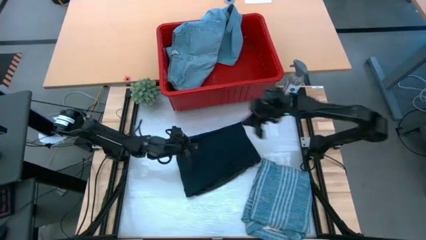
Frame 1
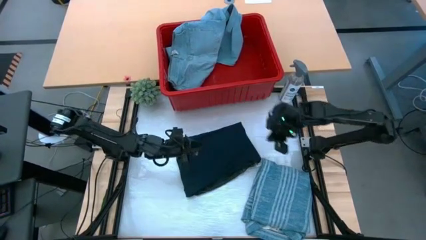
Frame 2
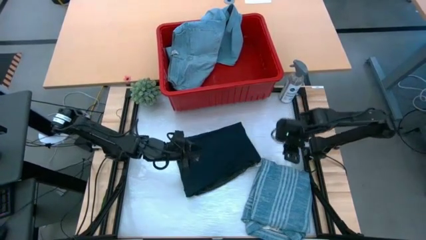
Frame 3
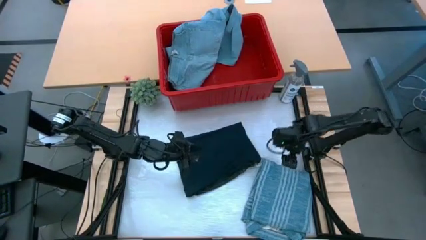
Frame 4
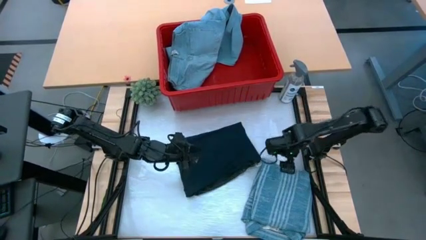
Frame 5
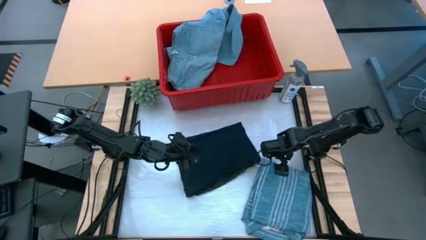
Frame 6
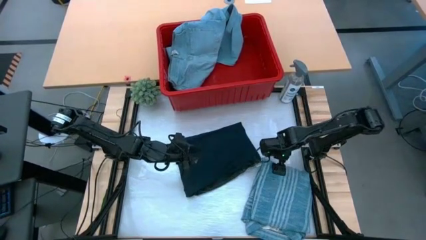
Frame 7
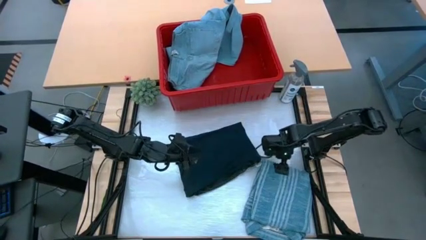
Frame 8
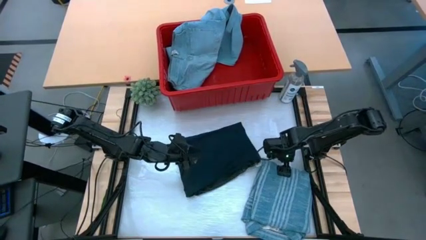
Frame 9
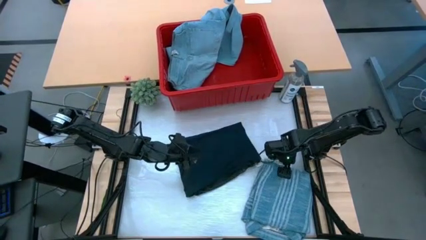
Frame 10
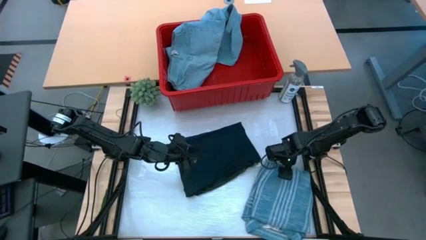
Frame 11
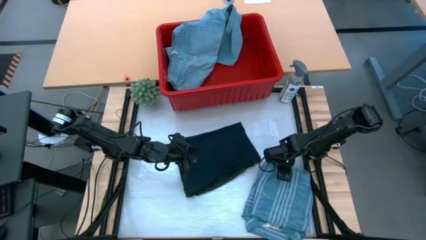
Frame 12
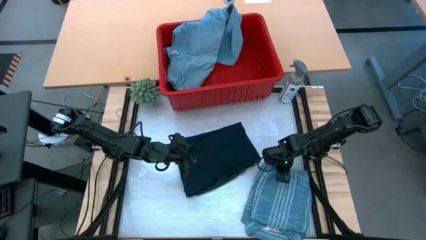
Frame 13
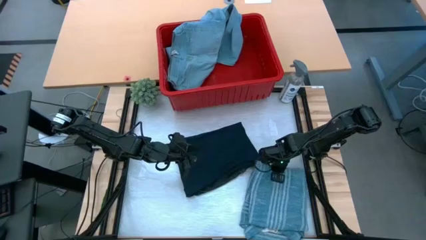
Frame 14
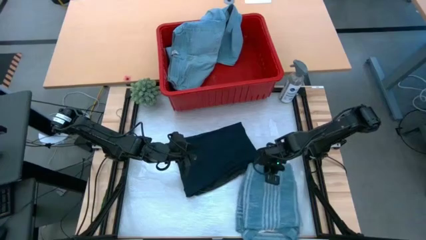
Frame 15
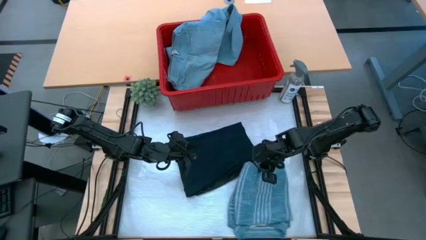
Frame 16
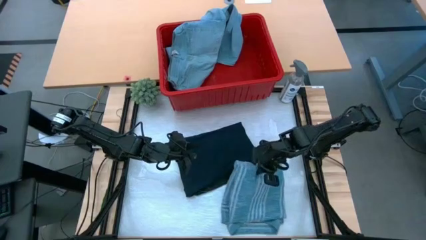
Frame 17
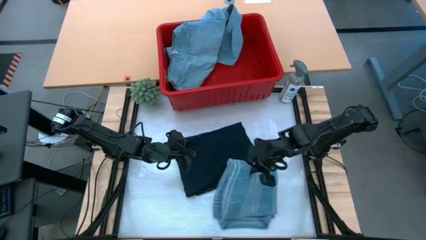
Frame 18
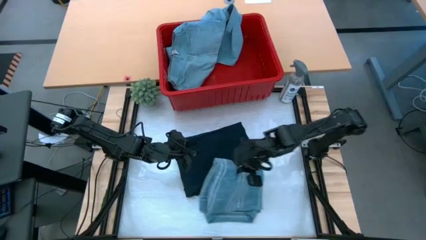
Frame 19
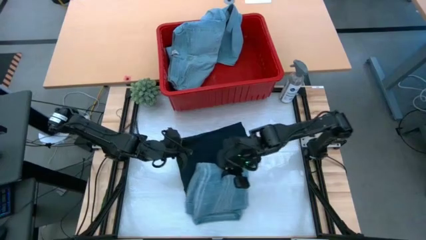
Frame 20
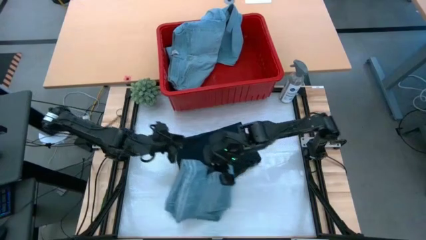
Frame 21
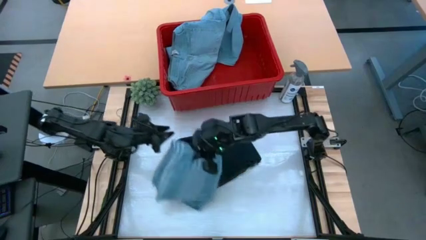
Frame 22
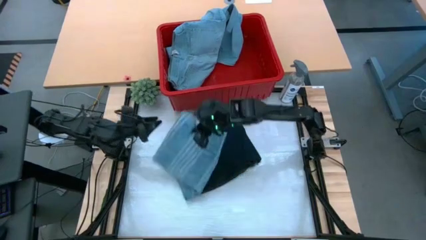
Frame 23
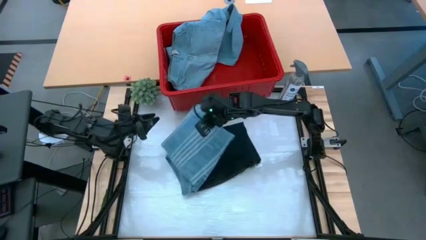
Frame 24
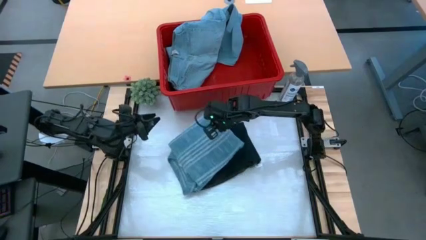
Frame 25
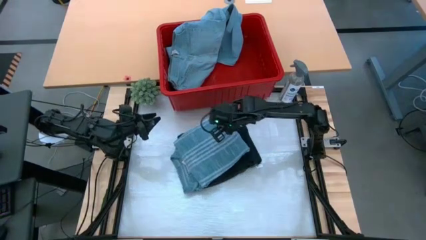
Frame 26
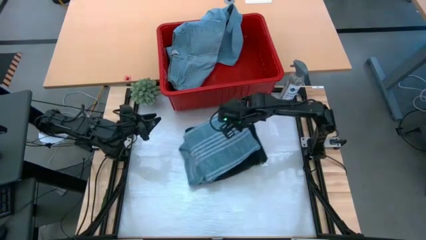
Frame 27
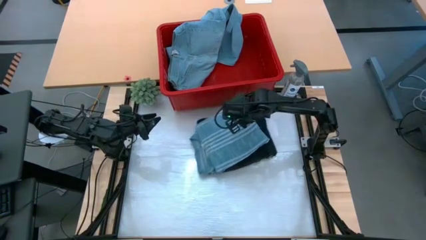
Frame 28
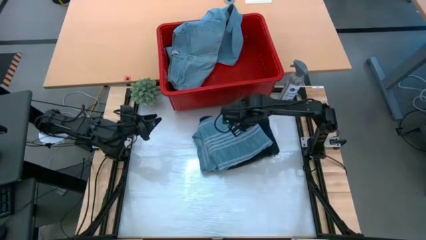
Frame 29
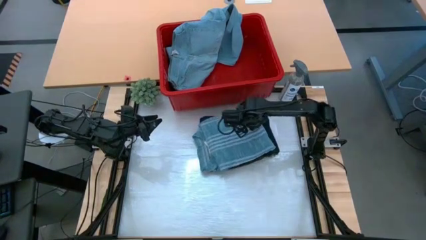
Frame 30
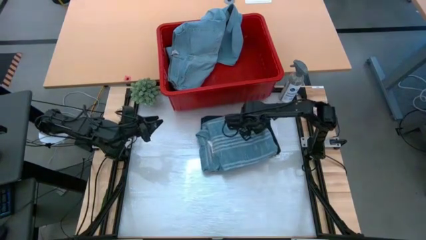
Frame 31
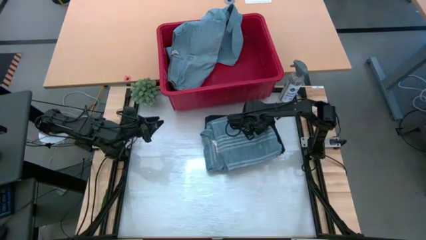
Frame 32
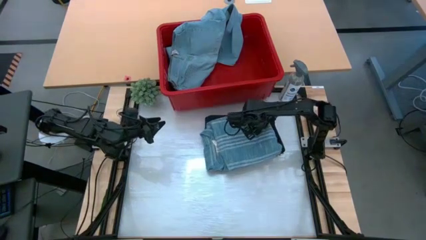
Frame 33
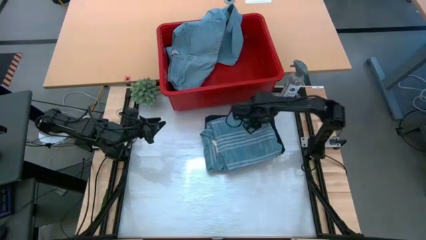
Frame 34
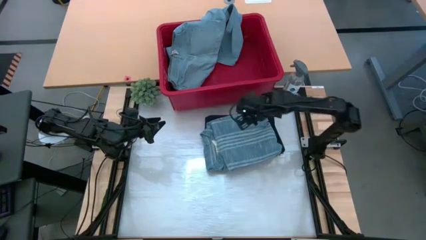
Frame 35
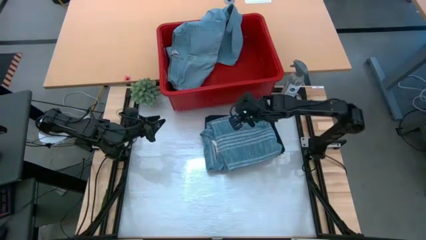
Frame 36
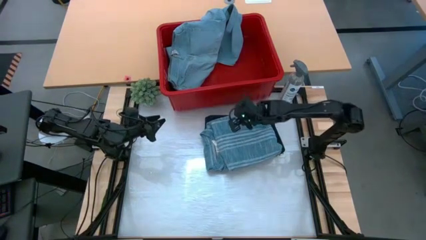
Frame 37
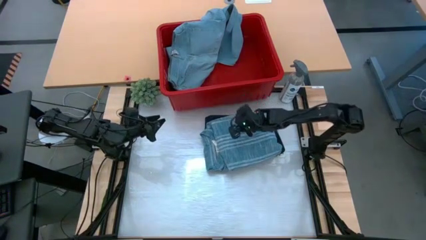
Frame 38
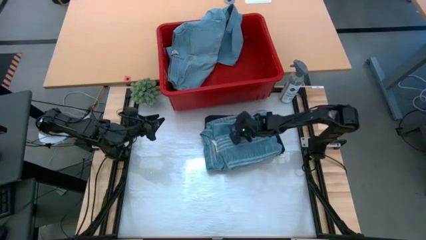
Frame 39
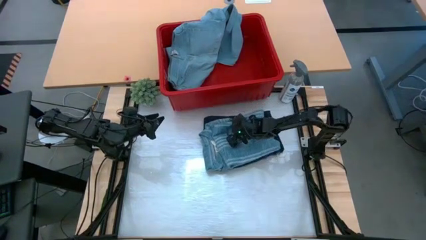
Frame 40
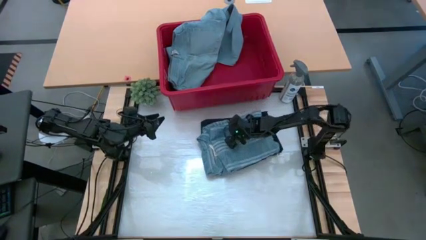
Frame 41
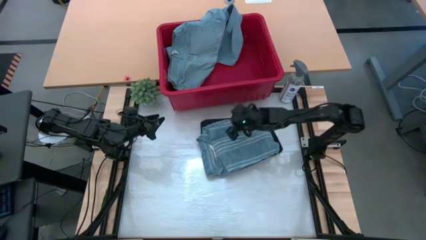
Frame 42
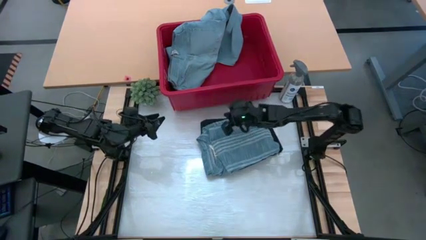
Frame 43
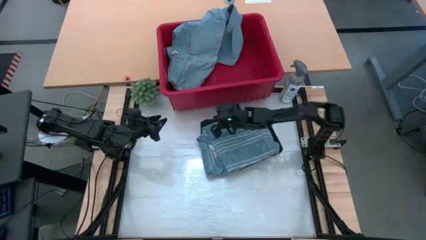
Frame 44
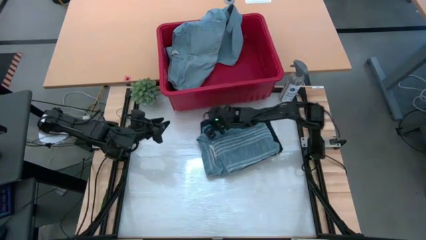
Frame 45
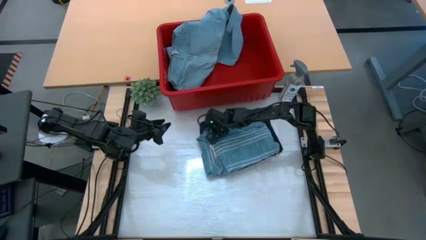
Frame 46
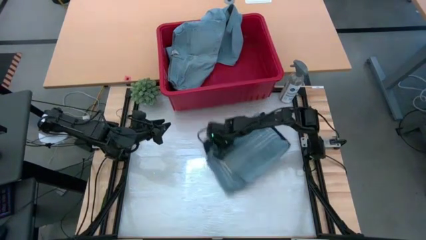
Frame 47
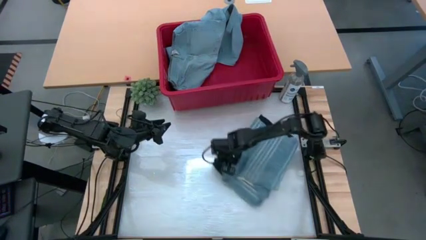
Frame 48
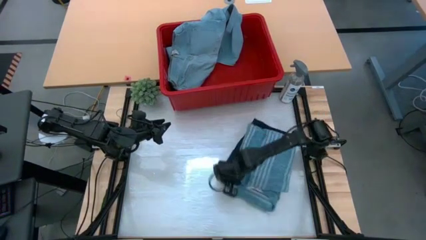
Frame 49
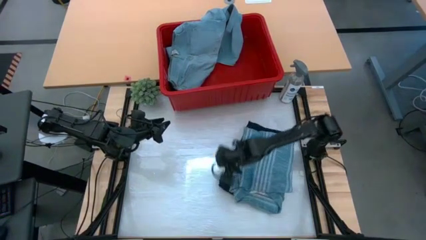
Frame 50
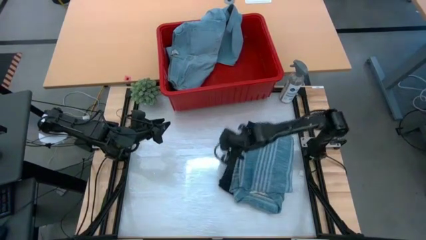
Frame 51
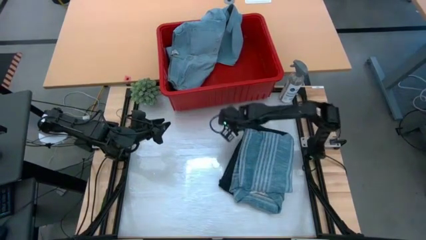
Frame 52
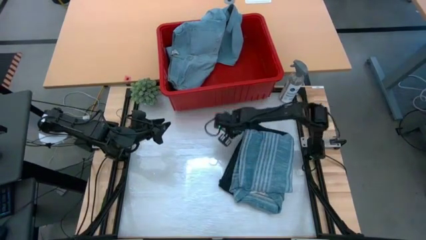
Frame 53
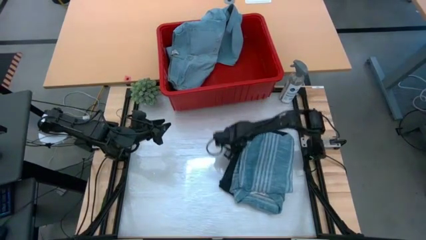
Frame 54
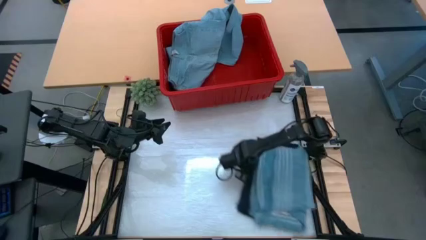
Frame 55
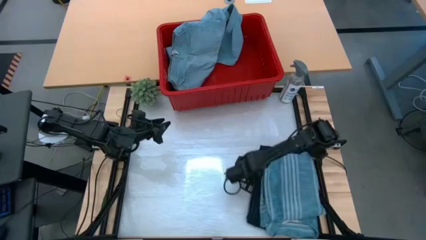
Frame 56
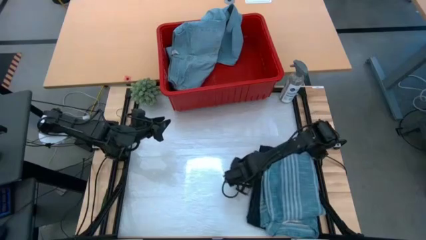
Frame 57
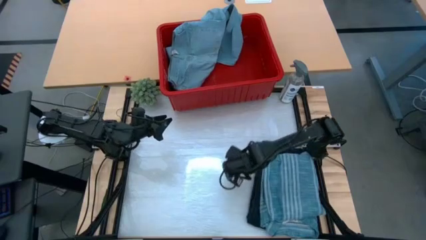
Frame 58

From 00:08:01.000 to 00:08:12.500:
Task: Fold Laundry from Bin
Stack the folded blue polo shirt on the blue denim pants
